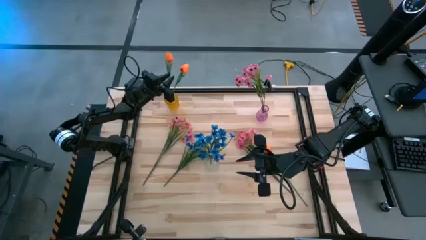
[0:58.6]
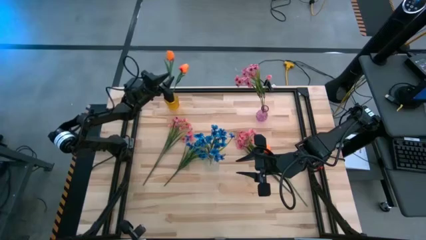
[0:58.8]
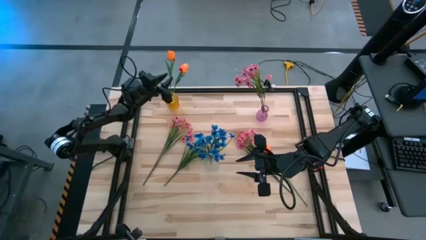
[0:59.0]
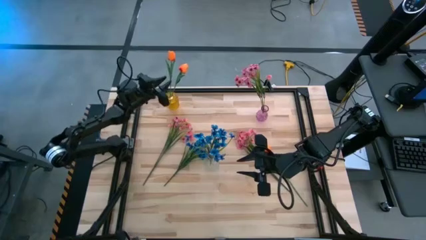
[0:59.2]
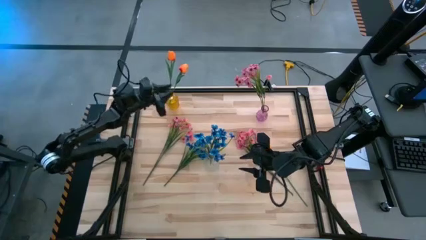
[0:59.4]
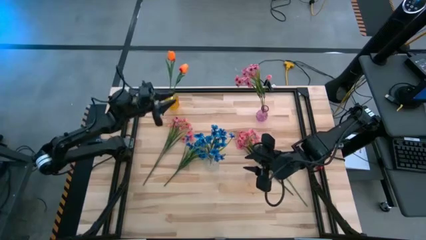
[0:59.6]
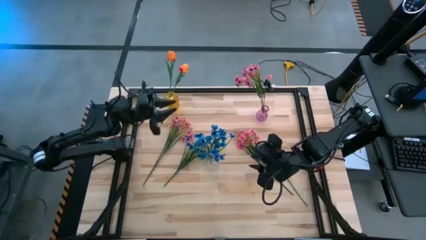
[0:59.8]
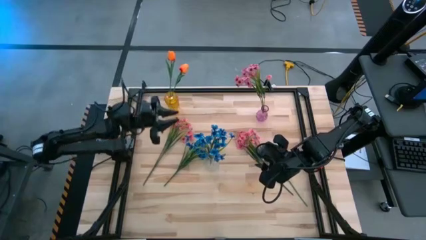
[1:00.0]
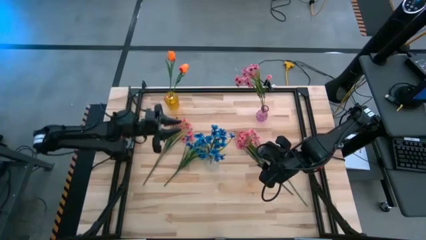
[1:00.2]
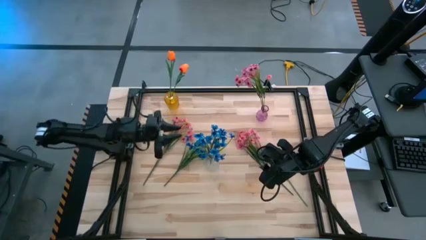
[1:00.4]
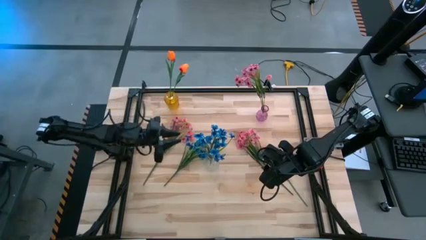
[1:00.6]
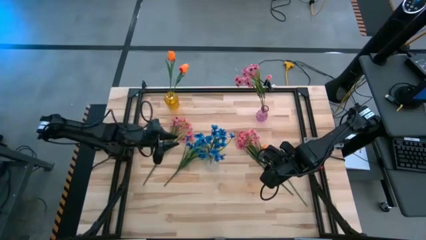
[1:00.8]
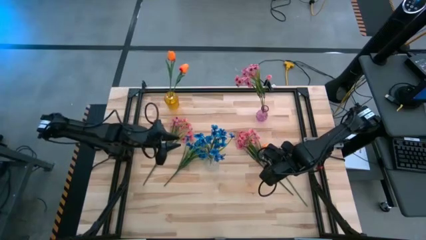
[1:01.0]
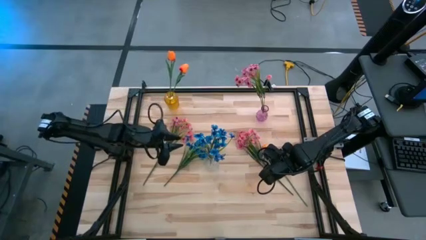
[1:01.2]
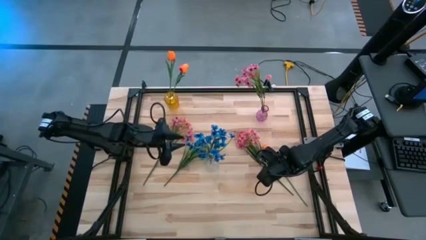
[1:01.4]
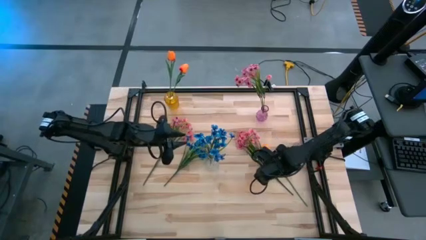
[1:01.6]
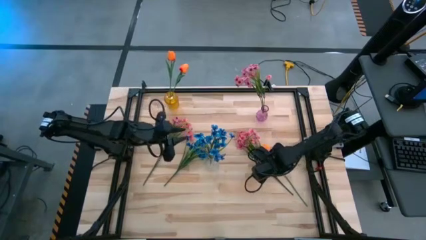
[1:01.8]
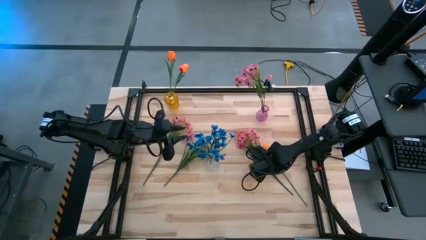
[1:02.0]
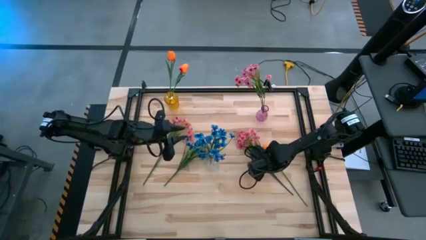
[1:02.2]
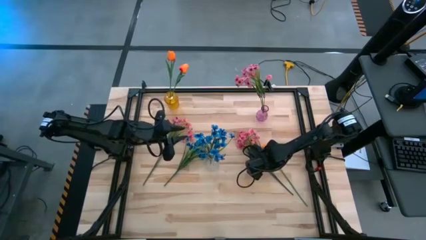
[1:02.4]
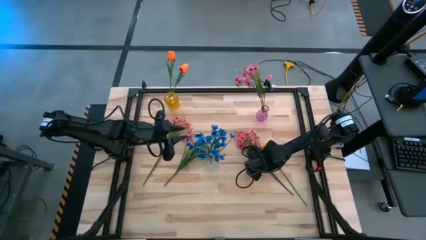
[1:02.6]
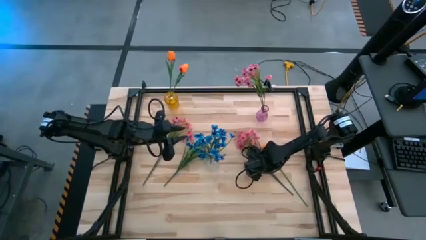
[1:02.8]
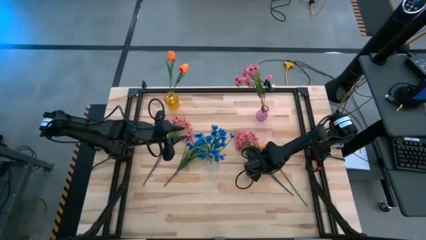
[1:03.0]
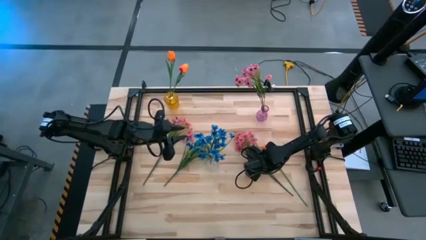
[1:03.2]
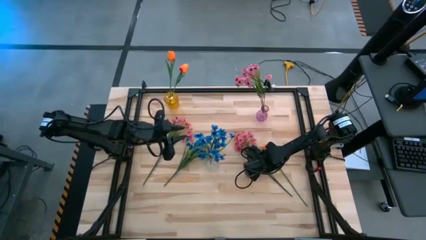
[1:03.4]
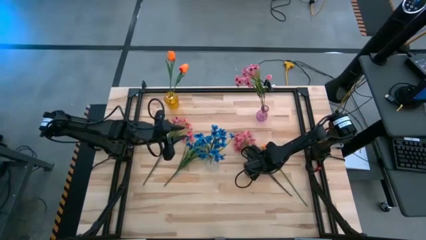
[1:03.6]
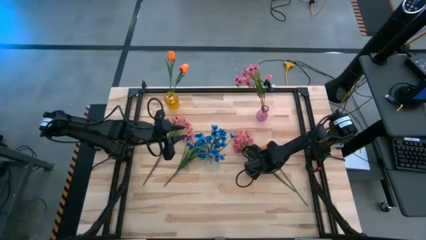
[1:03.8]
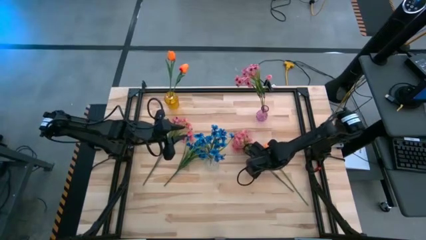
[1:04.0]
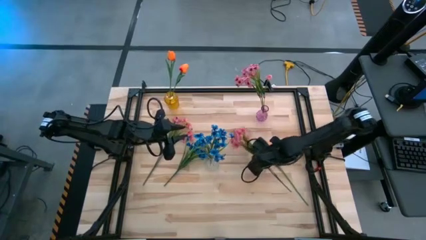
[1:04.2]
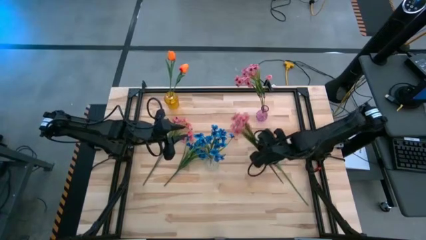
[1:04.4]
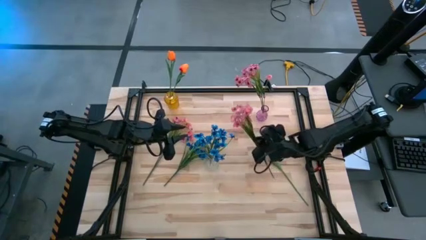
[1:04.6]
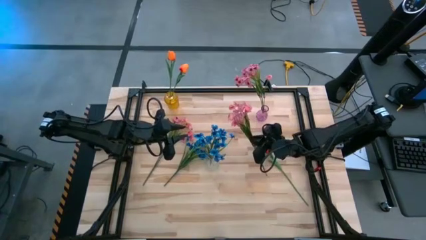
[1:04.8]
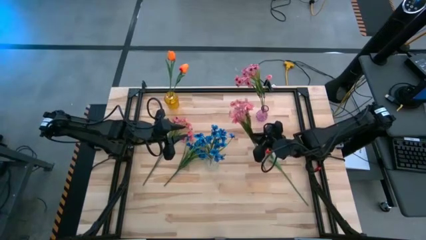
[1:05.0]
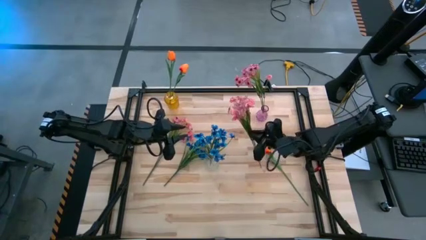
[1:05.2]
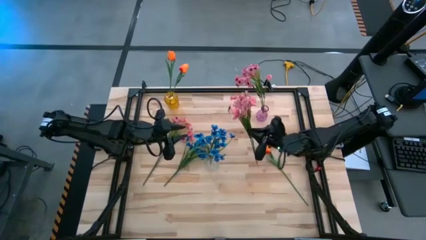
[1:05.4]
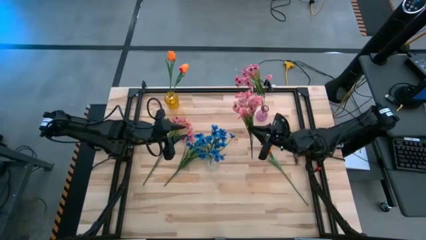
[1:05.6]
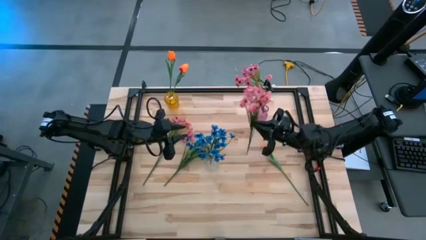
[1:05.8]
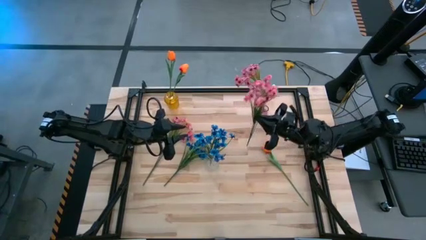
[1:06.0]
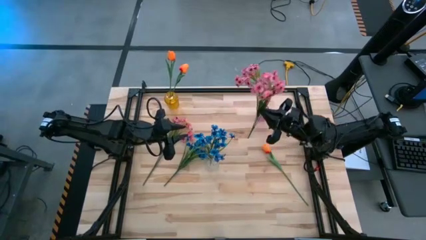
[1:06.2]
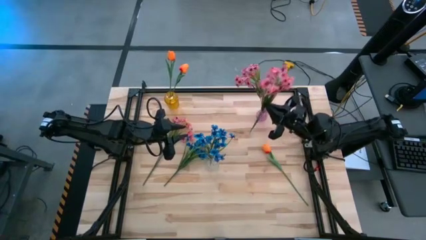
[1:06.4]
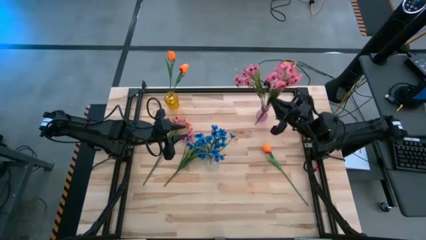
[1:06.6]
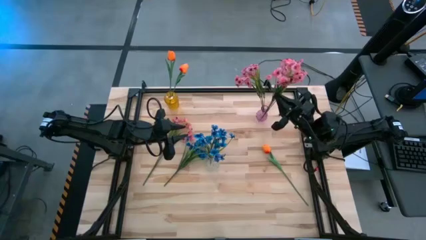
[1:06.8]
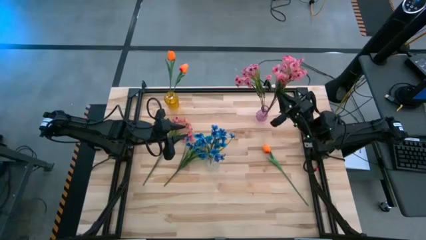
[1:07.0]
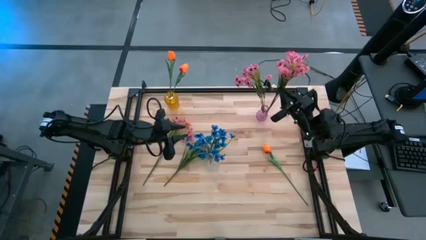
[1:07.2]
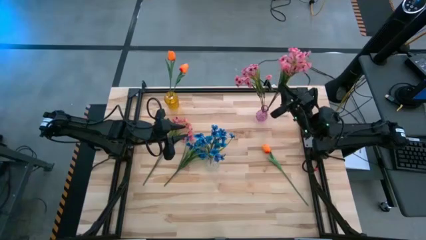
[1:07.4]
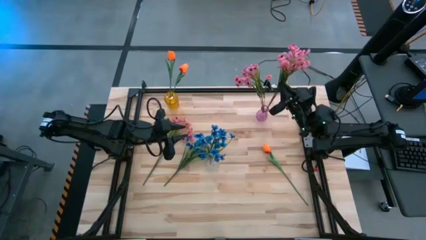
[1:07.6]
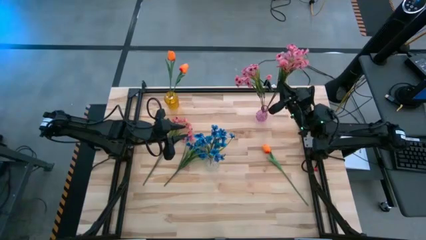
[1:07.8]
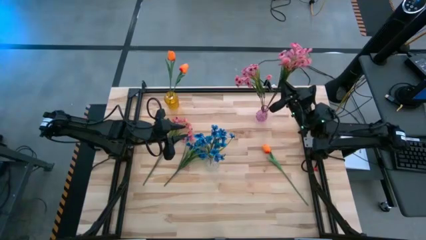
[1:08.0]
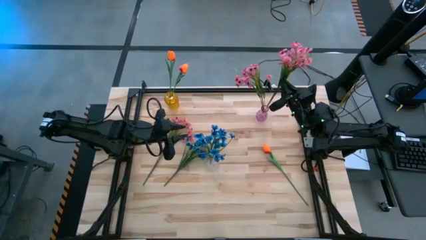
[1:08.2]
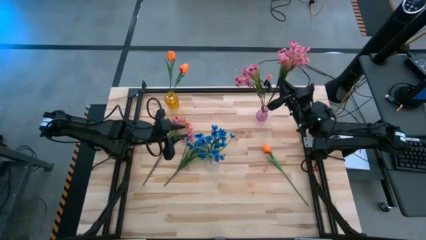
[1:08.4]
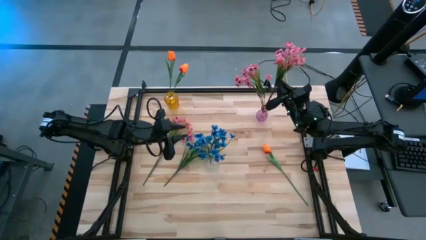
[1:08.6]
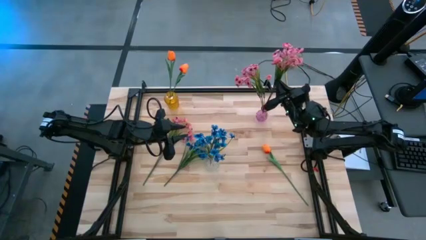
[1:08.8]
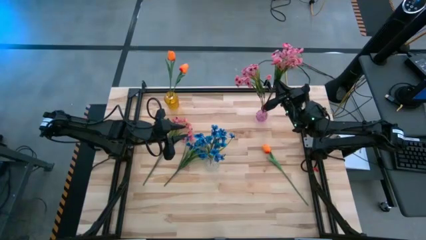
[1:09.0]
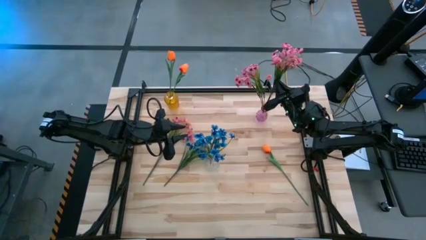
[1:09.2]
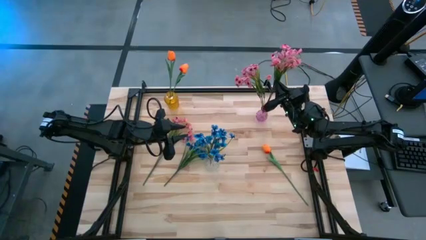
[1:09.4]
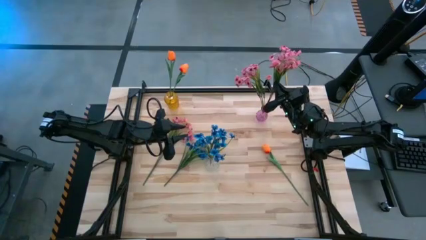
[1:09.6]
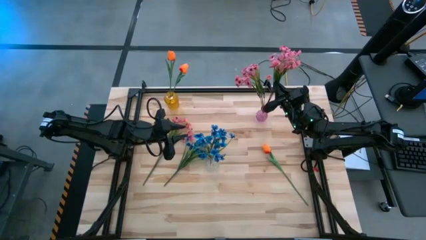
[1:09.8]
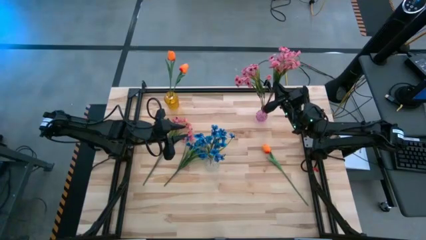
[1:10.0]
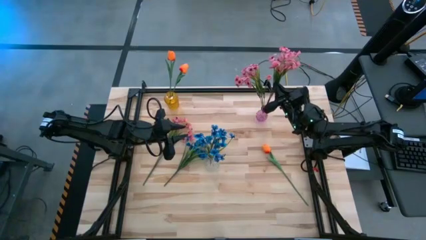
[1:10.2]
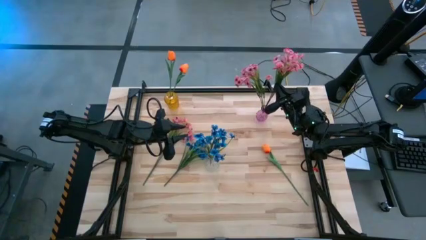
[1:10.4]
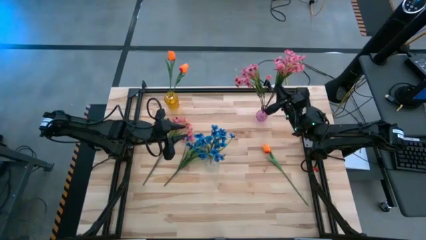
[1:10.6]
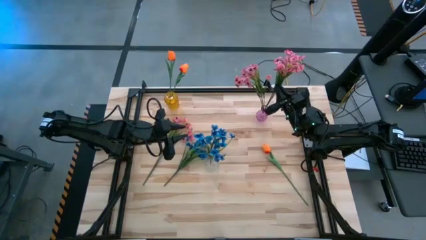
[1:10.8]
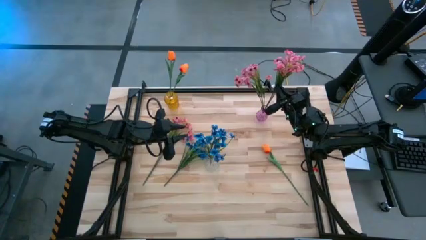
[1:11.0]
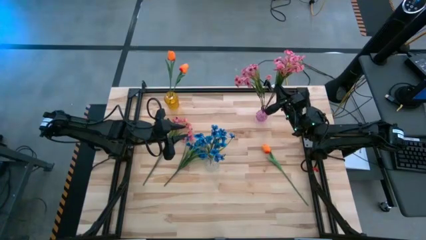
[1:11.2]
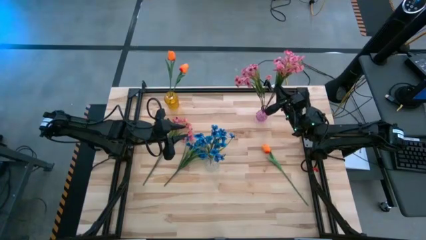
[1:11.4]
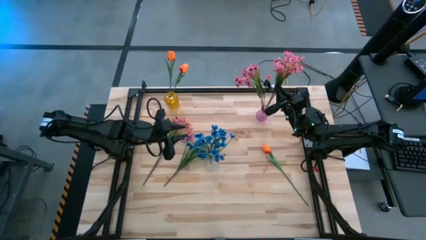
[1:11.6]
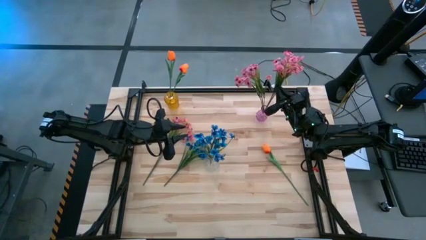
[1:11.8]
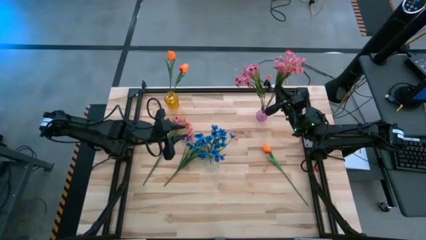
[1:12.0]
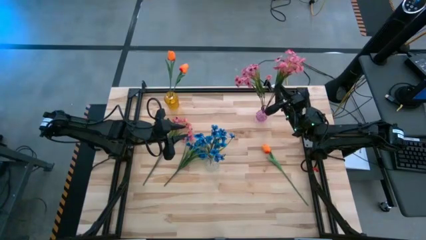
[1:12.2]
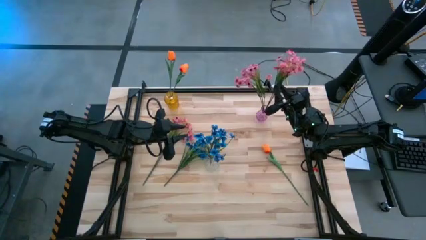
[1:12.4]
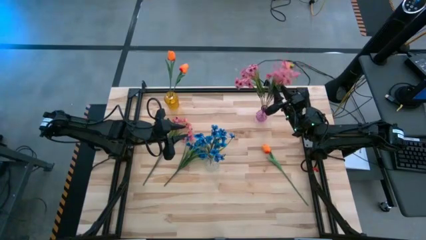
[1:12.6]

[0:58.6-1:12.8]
Task: Sort flowers into vase by color
Put the right pink flowers into the pink vase
